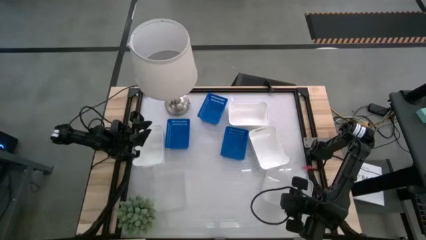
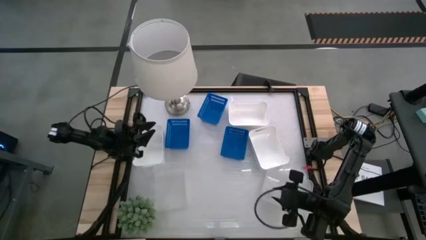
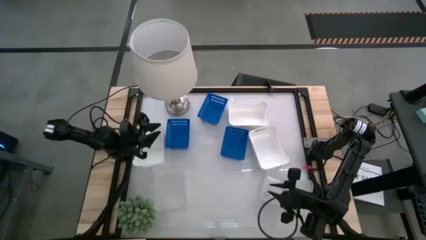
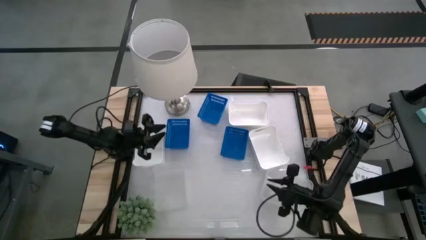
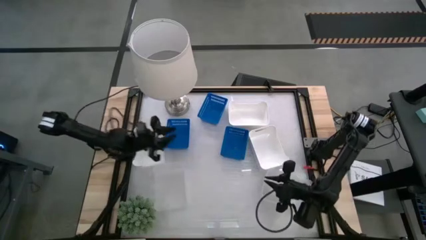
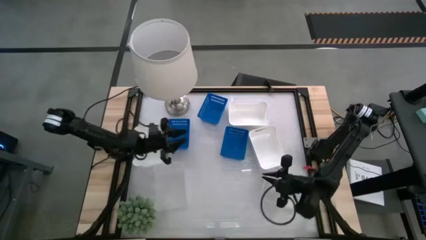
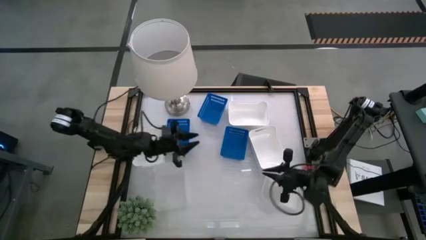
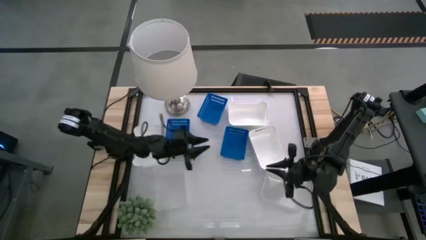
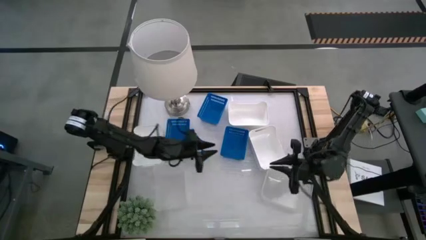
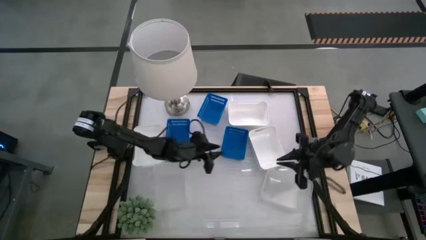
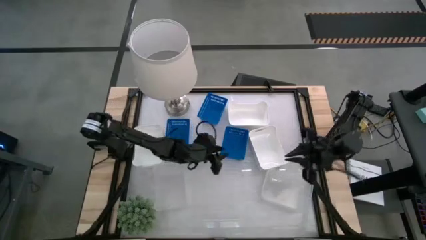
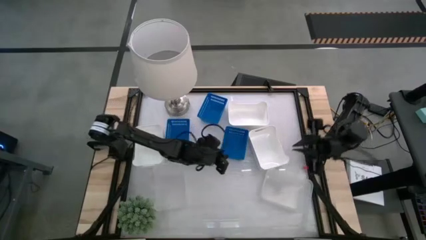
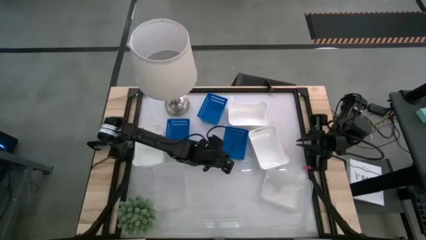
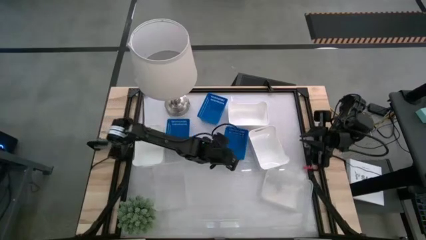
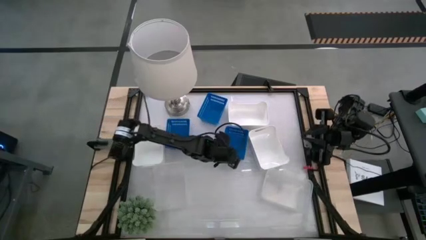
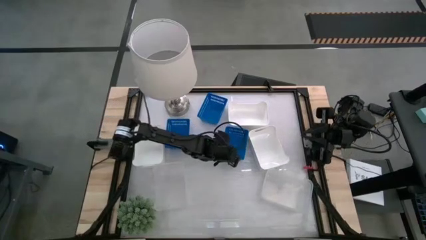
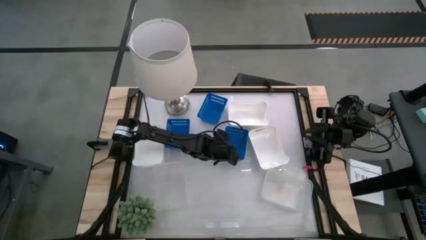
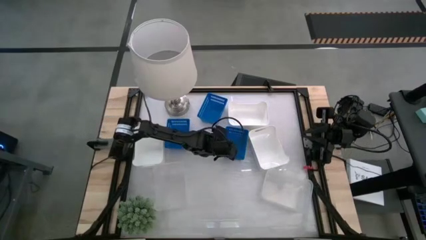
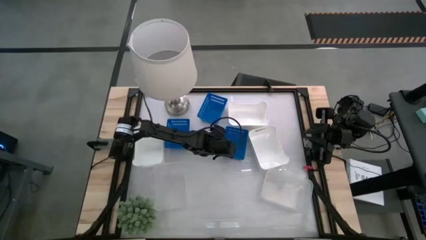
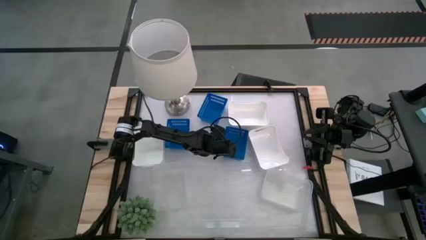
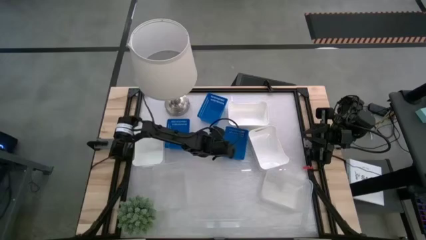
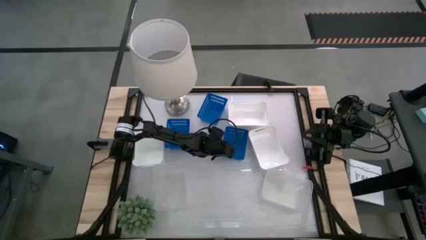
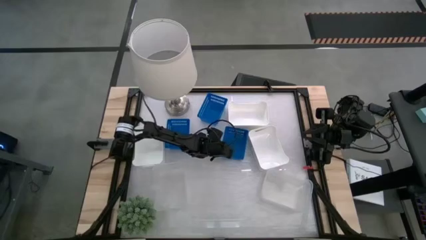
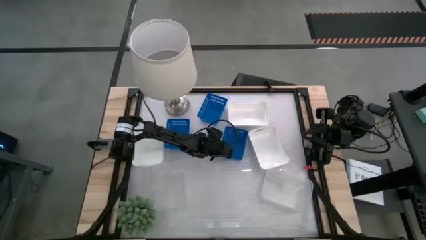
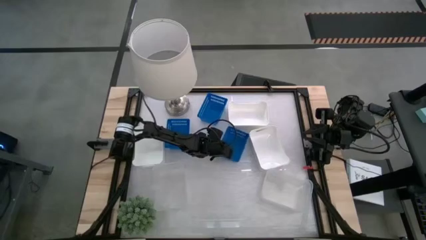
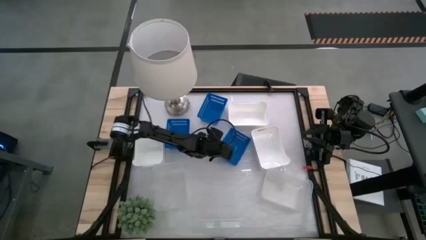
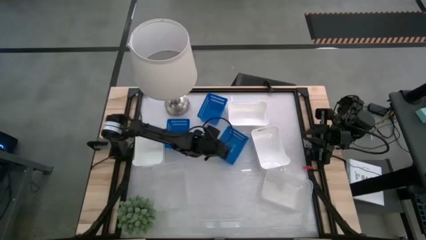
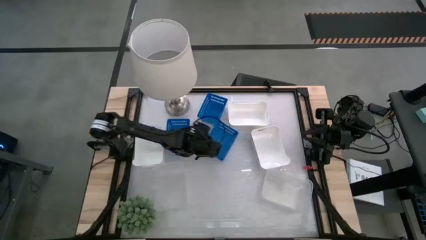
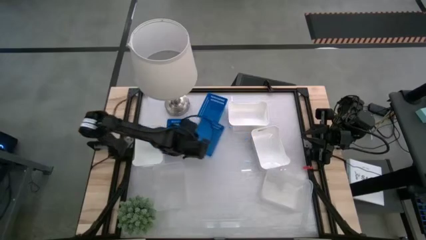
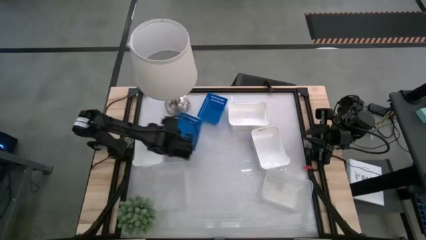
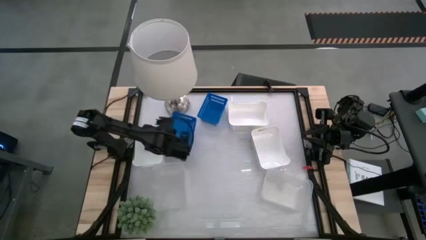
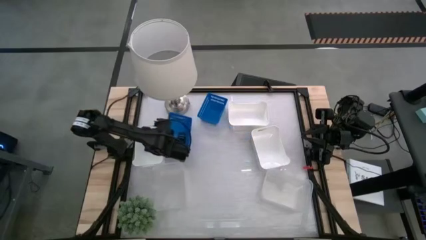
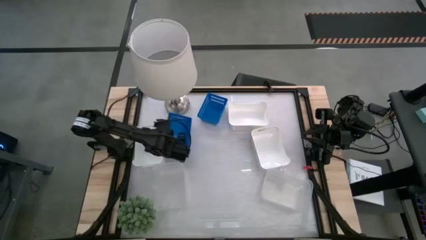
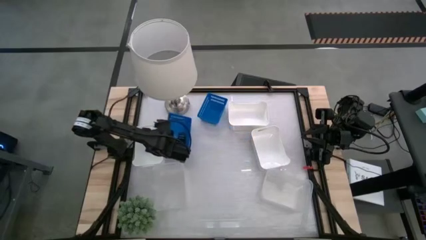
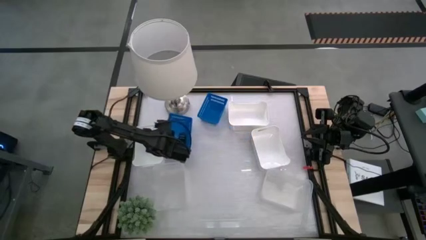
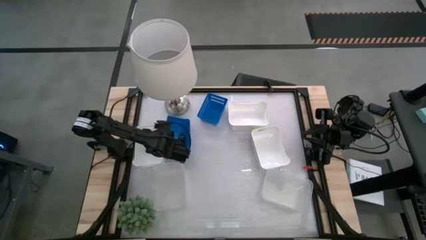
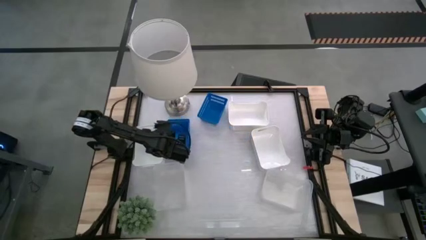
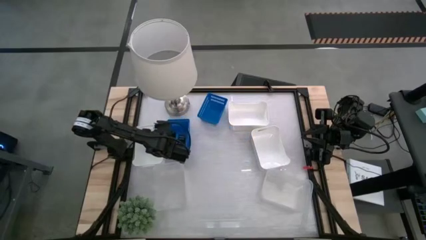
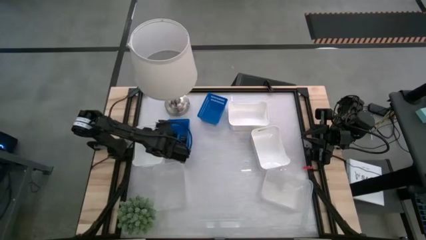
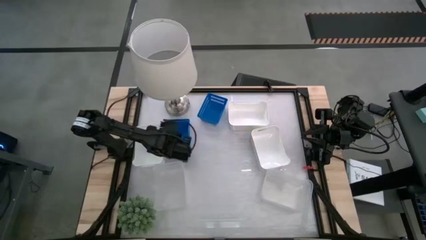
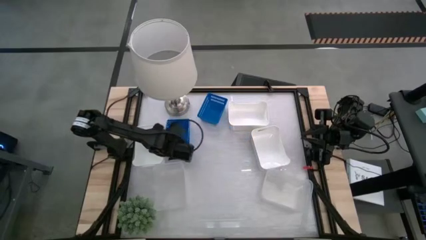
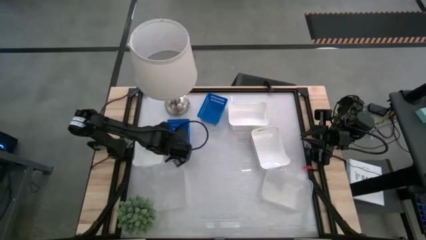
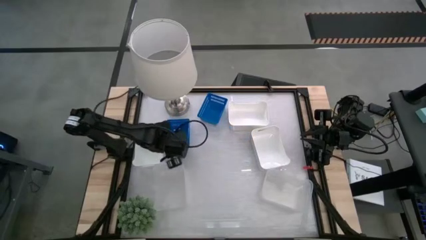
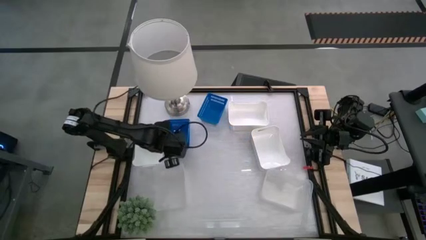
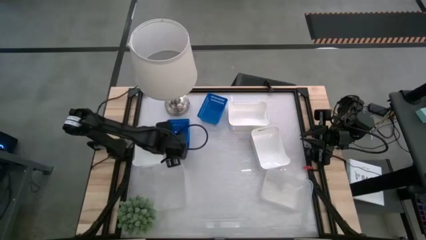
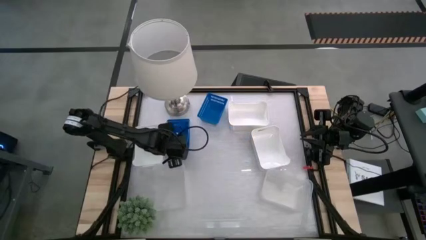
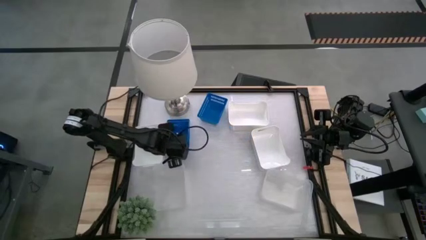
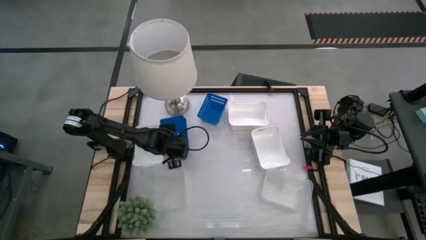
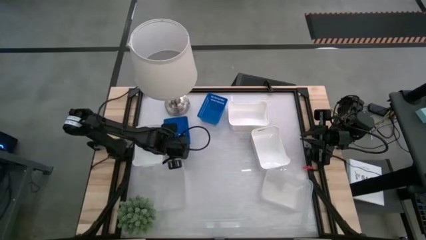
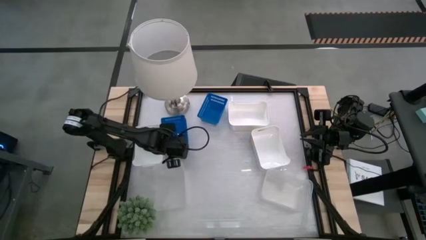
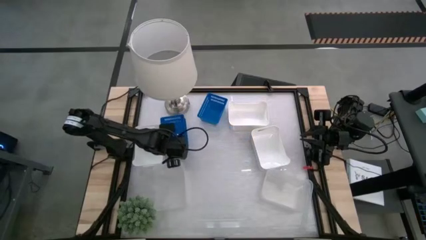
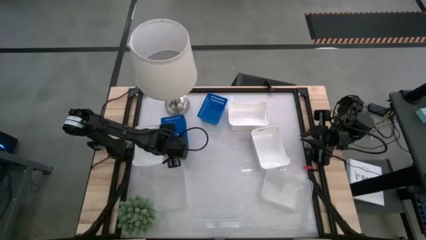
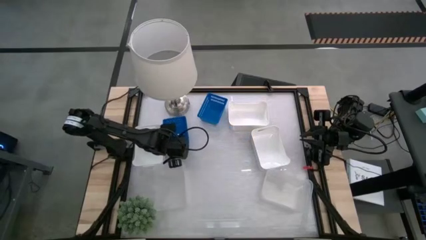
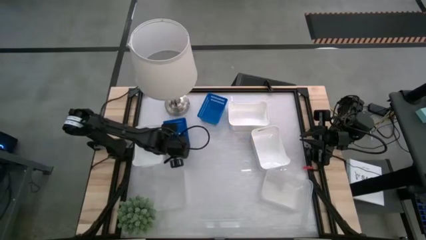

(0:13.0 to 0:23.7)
Stack the bottom right blue bin on top of the bottom left blue bin

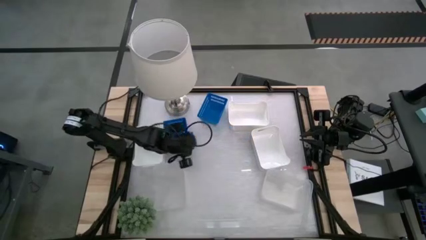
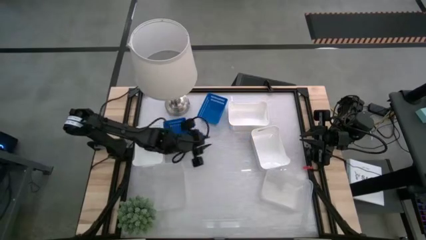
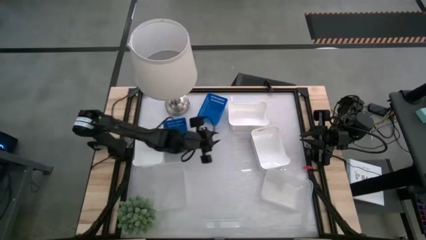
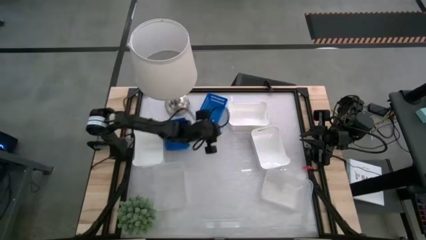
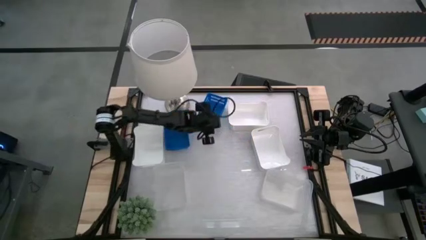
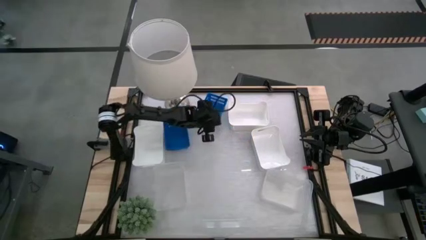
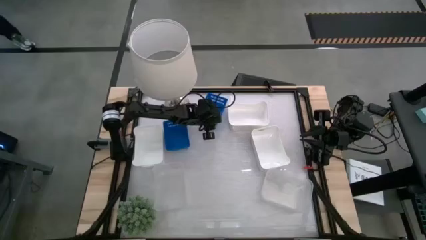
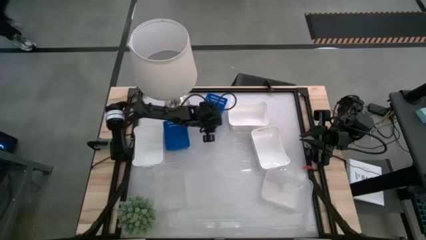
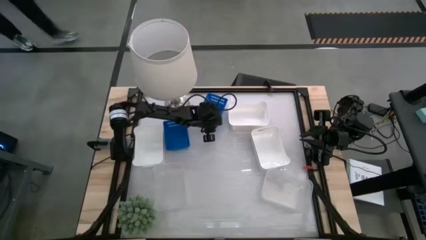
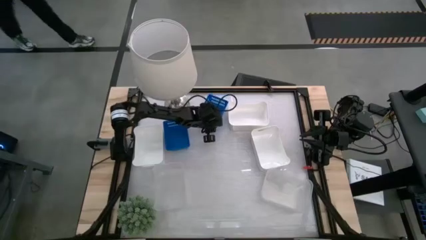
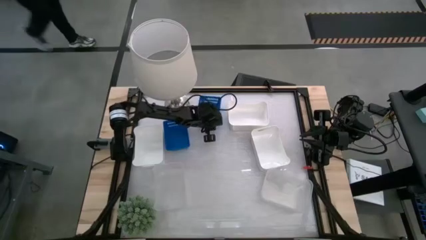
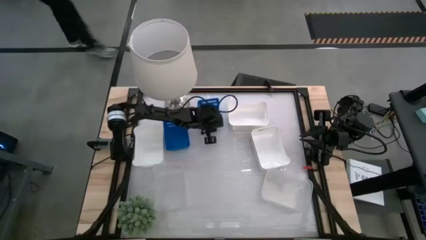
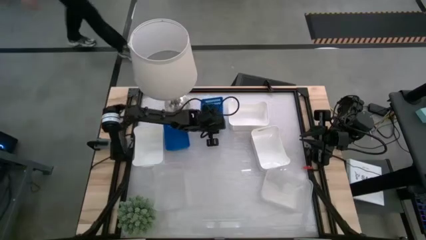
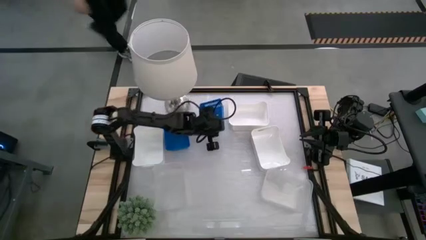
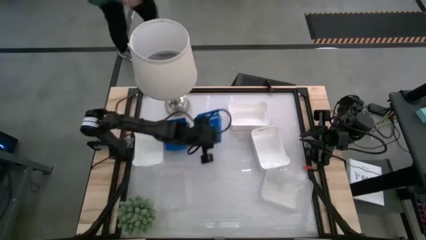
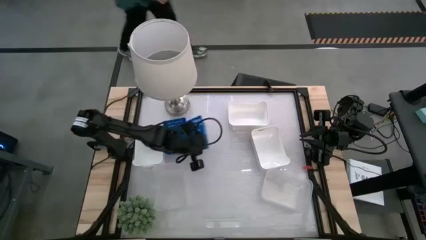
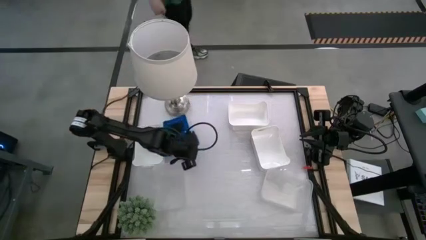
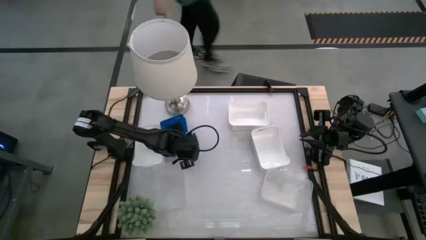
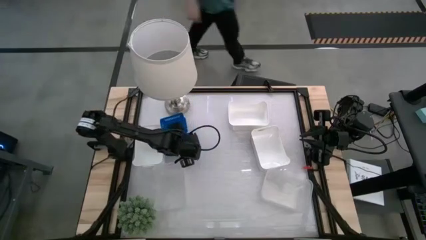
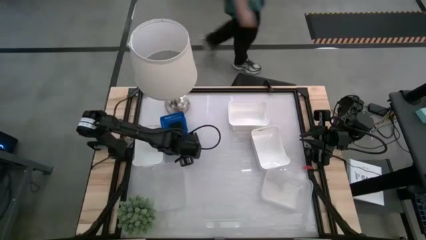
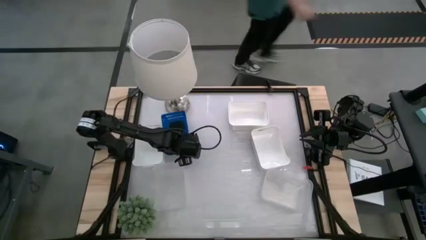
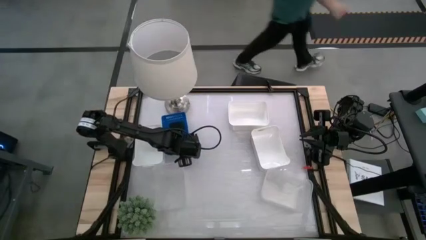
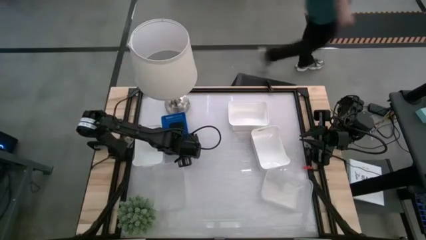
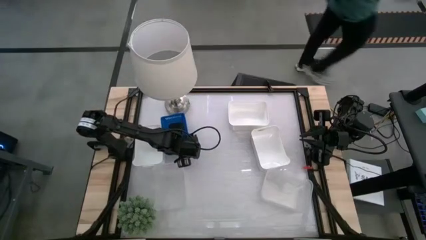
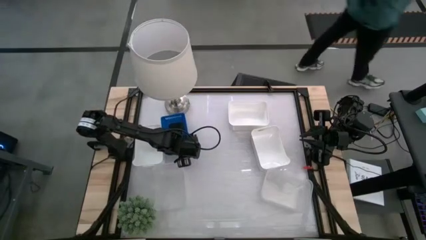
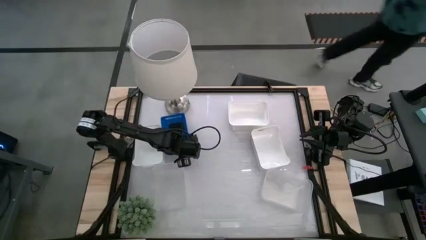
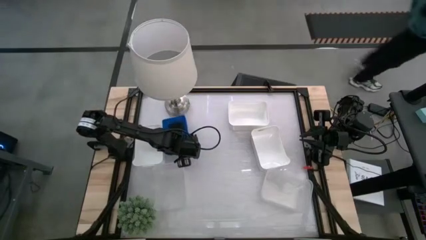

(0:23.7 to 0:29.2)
Stack the top blue bin on top of the bottom blue bin
